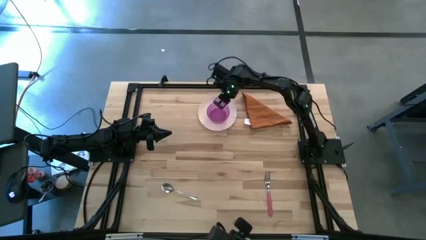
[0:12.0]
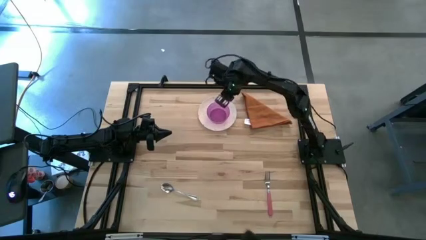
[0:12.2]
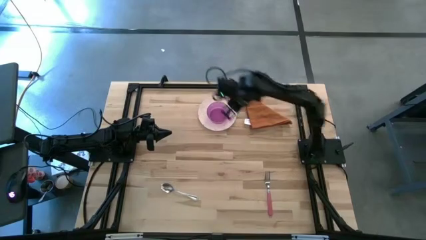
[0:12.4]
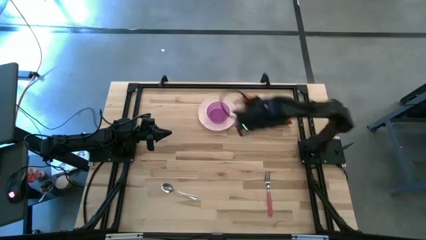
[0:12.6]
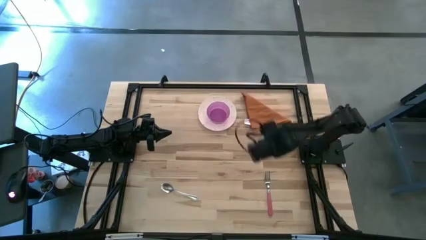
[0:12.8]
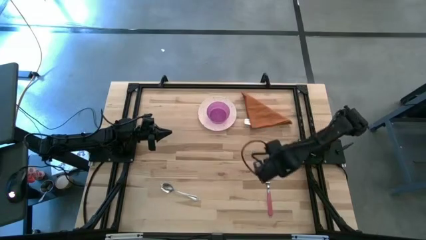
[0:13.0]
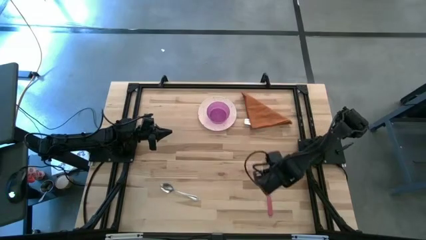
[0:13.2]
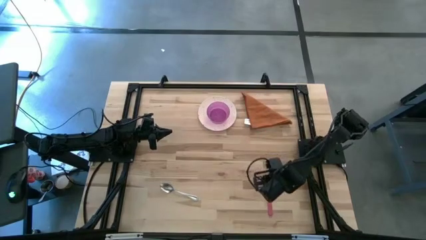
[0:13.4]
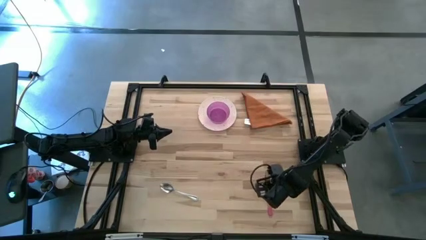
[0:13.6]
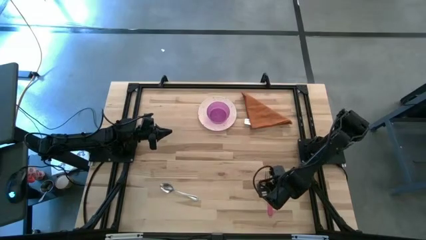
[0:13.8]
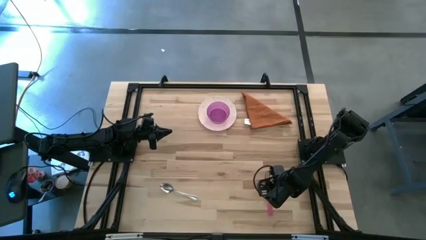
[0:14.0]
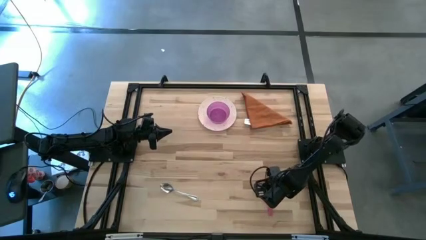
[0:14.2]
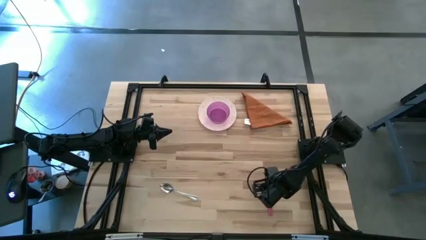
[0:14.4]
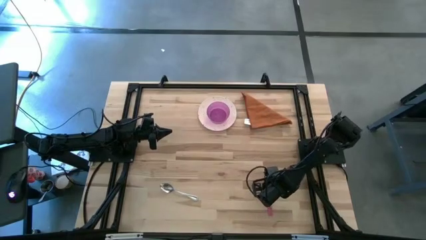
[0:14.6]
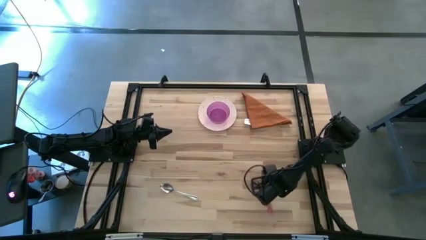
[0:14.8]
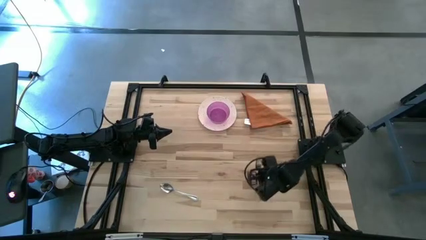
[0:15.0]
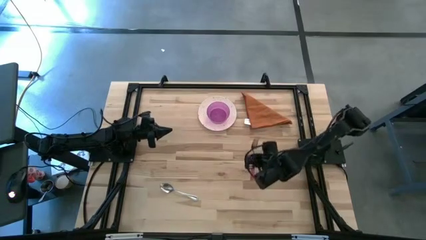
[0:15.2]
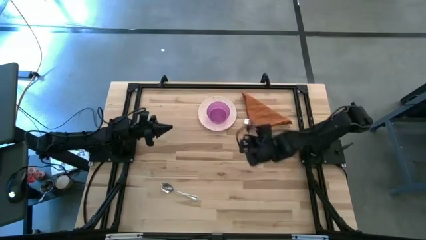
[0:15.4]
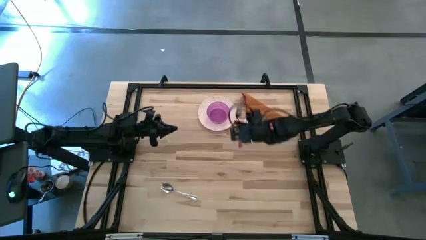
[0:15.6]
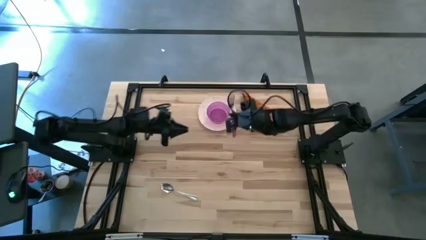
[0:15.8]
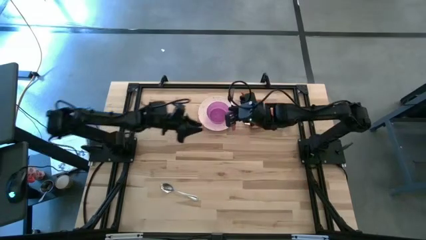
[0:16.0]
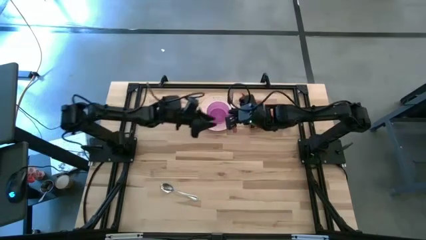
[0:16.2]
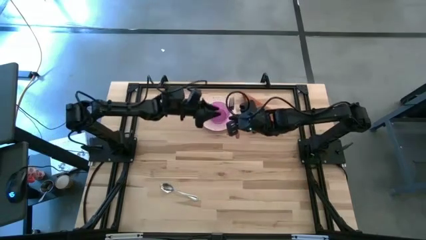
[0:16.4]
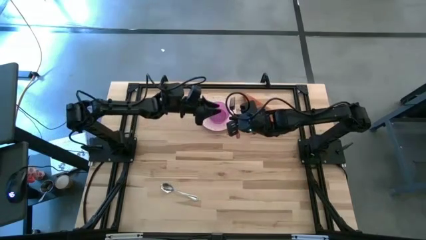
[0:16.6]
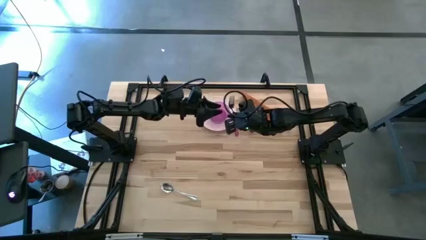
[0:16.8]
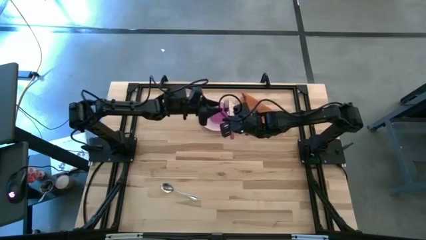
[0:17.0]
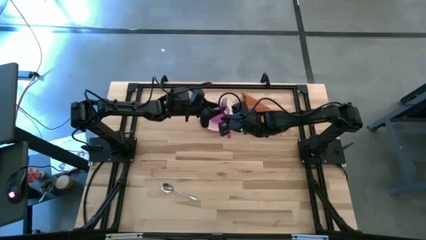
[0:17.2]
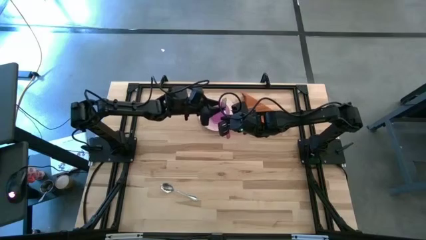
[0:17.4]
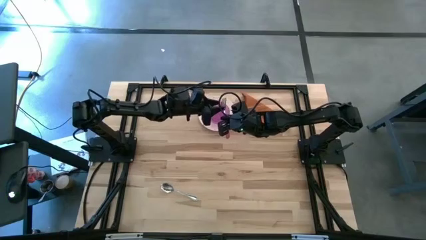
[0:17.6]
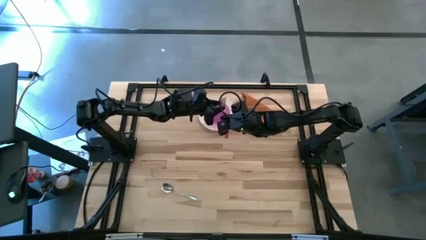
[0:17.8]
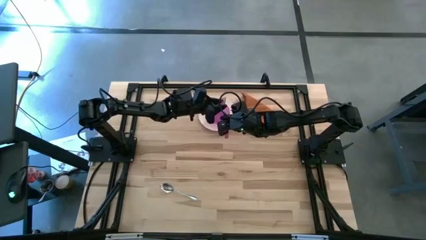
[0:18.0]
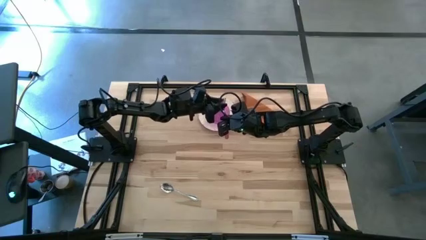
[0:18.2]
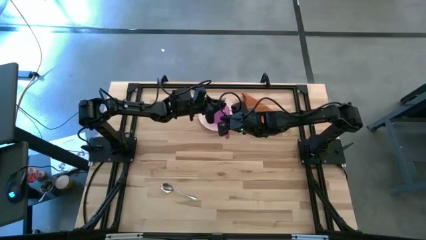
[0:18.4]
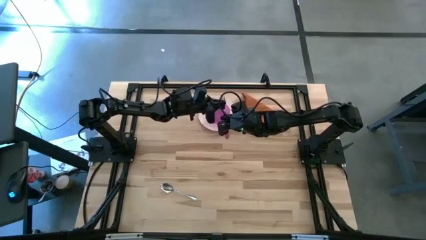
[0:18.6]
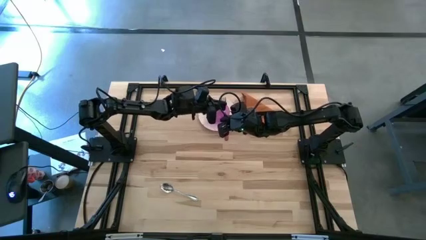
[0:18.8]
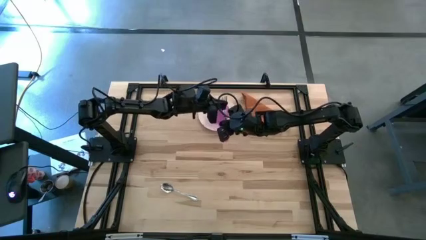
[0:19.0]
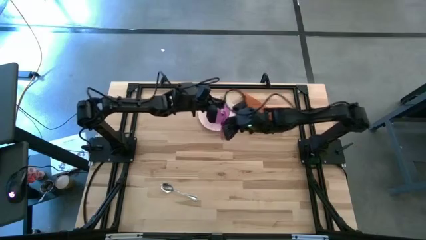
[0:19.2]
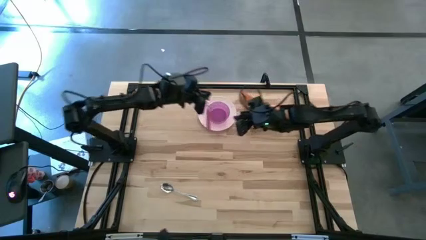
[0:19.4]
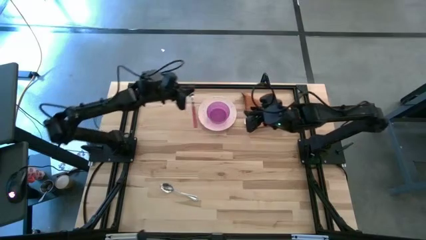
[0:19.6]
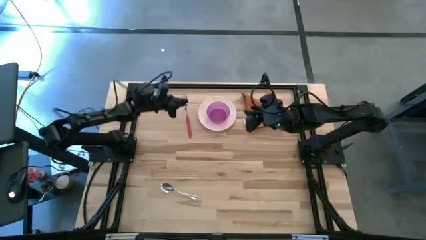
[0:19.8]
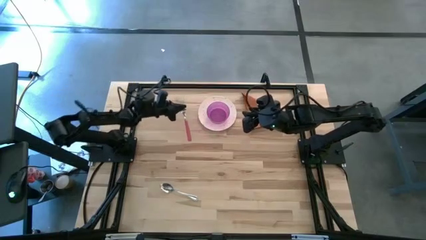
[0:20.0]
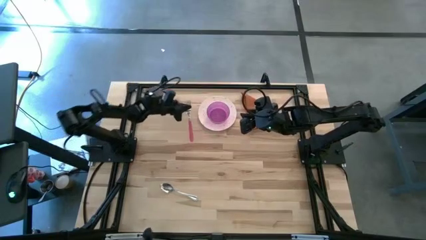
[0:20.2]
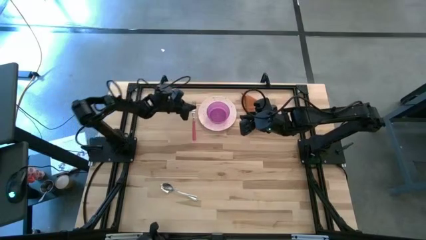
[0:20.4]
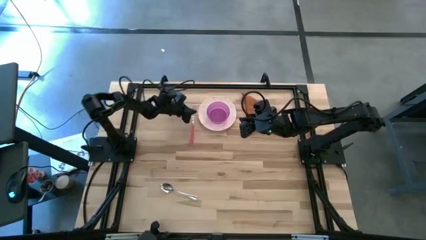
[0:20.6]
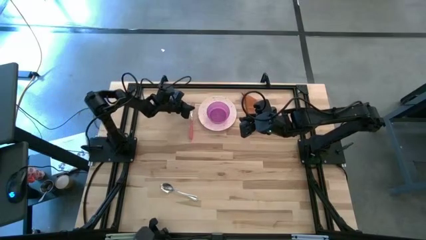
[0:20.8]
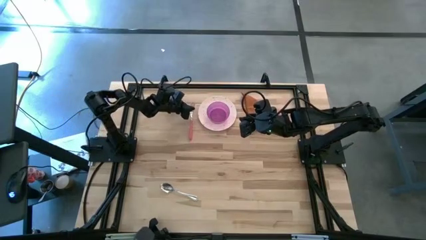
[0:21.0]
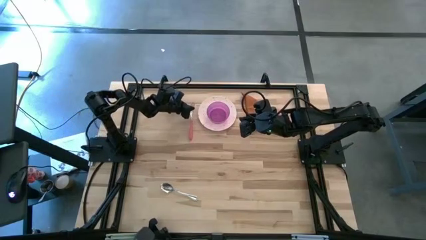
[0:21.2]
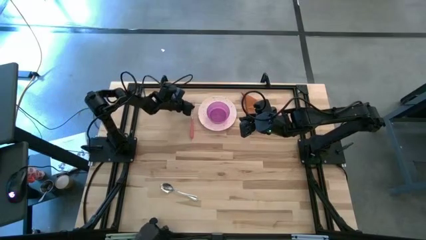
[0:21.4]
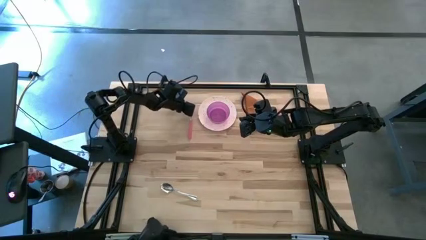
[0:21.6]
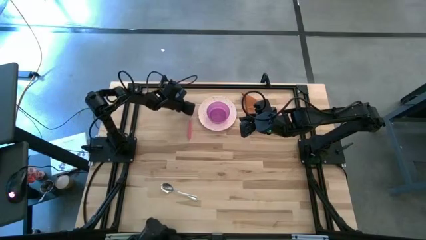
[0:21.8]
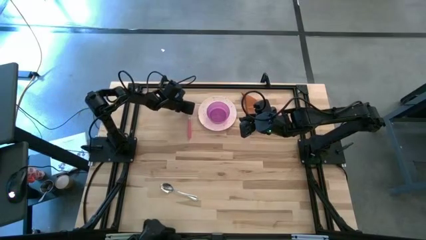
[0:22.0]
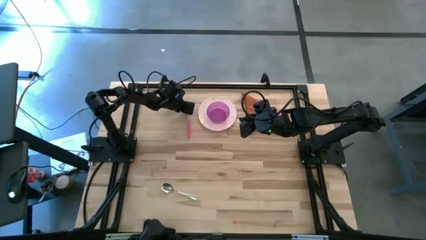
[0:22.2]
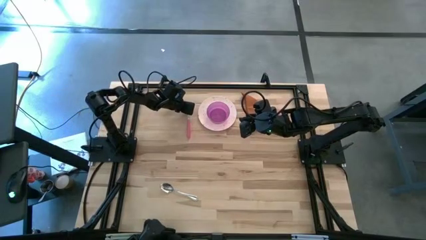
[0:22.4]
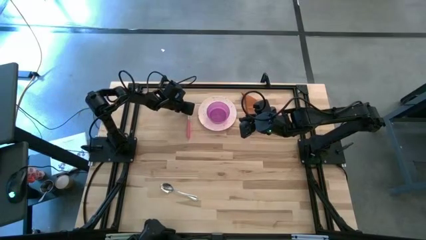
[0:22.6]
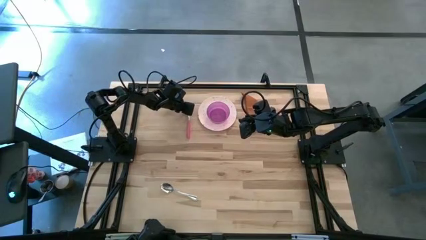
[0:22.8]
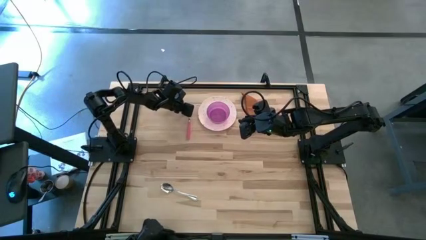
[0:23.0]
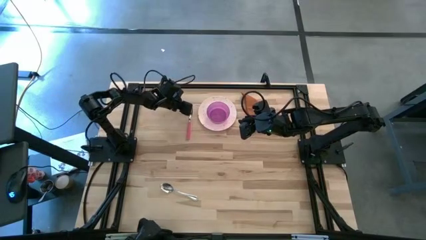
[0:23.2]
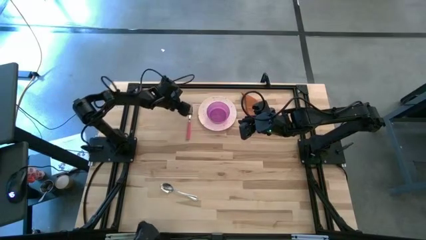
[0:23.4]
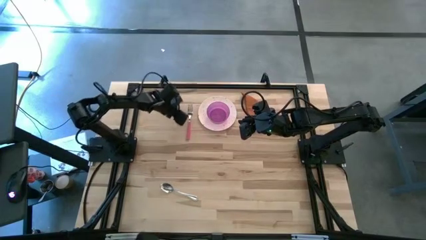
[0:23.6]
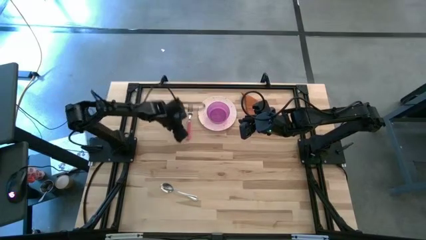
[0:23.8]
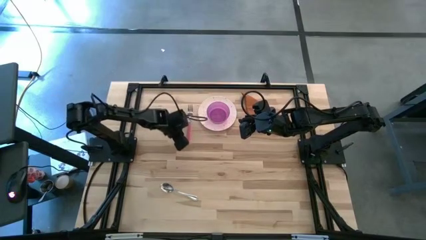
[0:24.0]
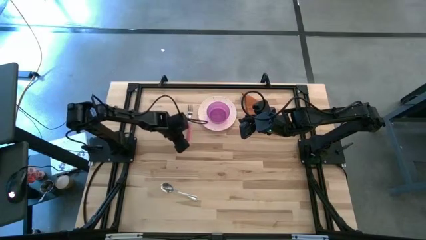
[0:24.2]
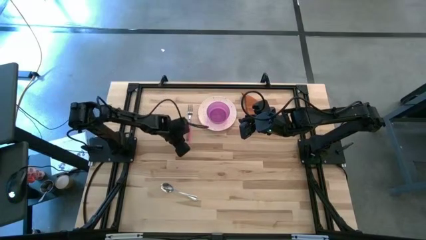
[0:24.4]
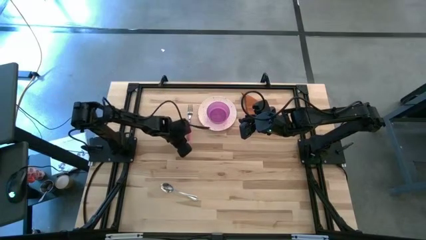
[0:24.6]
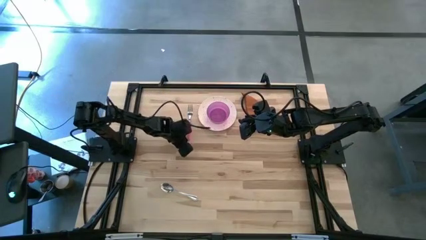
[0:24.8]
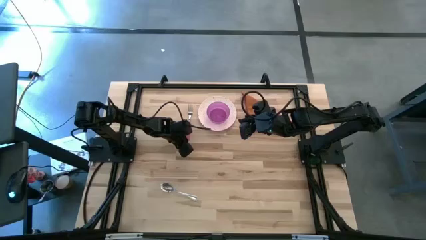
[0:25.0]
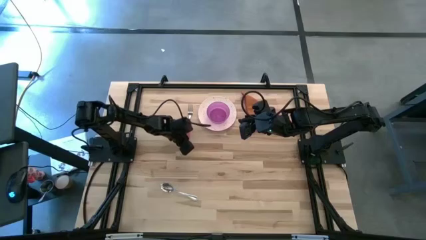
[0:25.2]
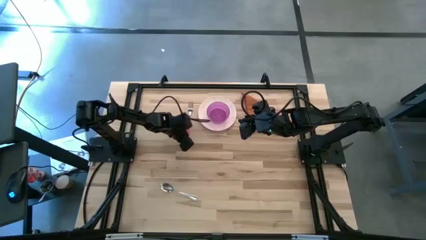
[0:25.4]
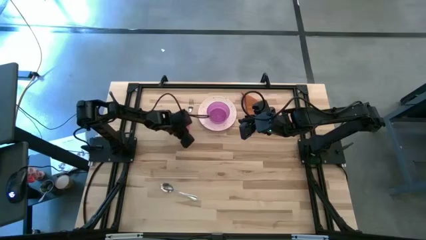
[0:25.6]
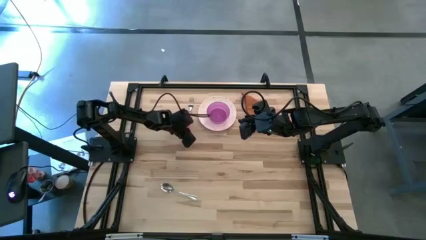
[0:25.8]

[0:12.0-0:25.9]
Task: Set table place
Put the pink fork to the left of the white plate
